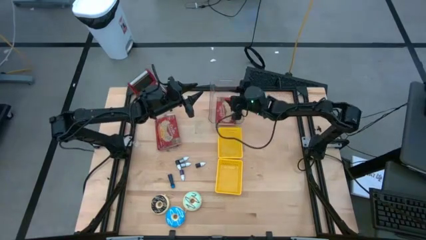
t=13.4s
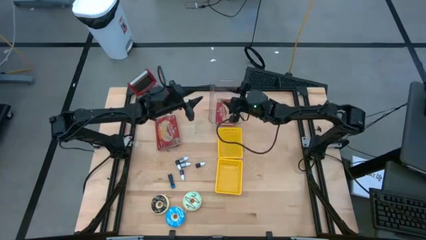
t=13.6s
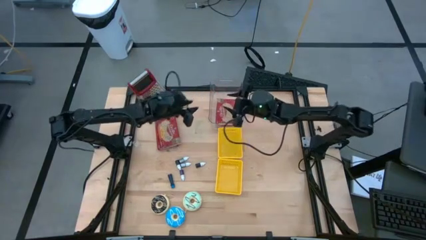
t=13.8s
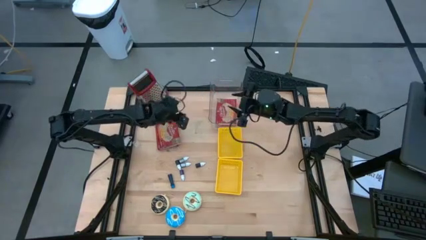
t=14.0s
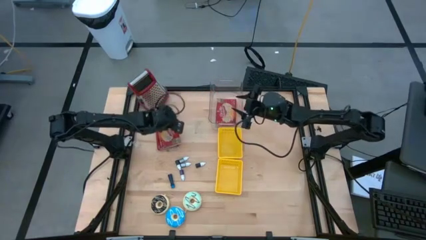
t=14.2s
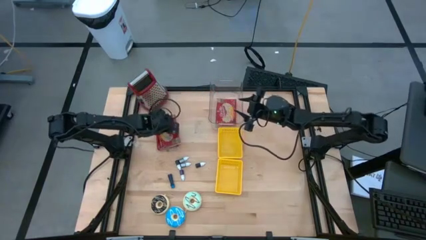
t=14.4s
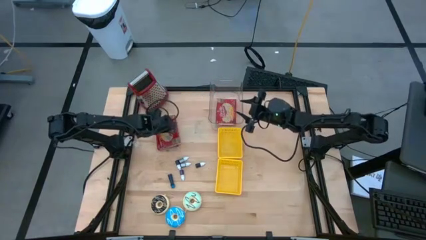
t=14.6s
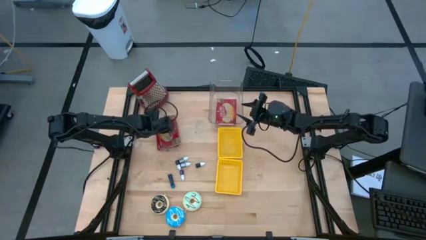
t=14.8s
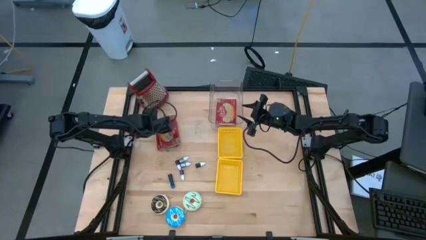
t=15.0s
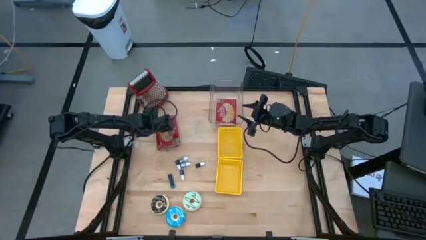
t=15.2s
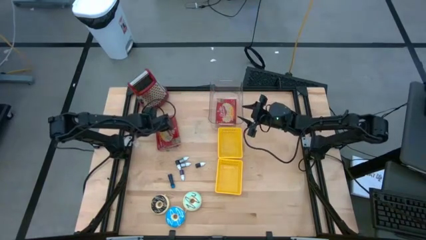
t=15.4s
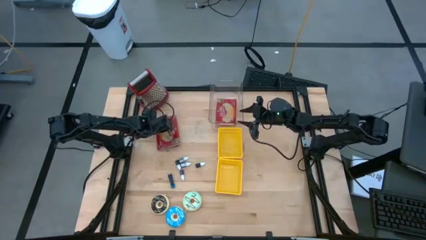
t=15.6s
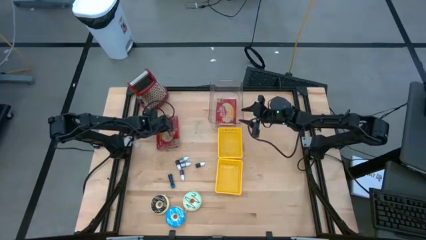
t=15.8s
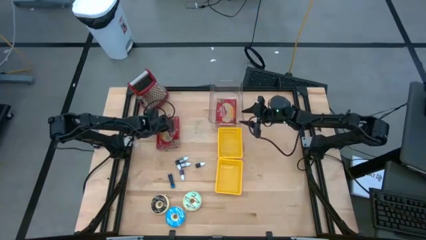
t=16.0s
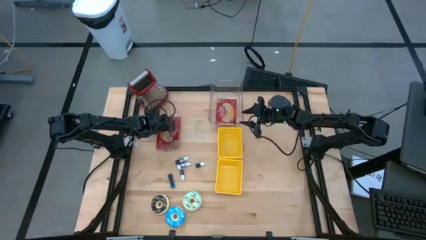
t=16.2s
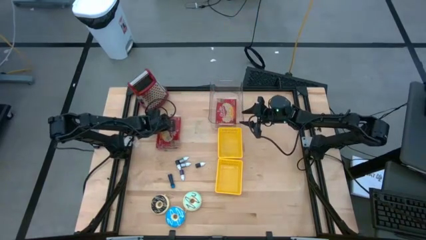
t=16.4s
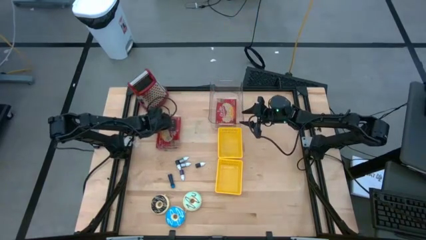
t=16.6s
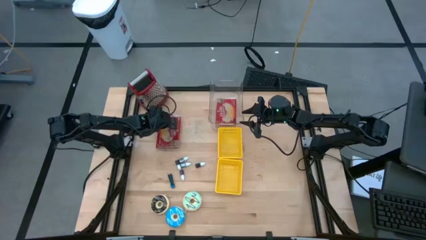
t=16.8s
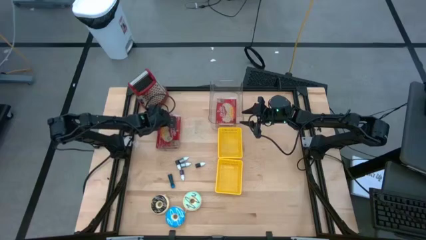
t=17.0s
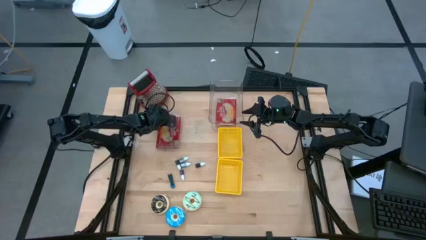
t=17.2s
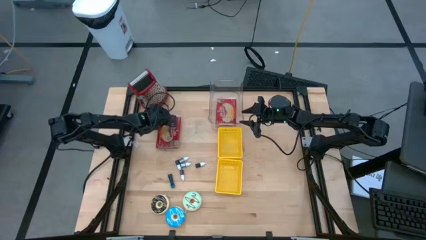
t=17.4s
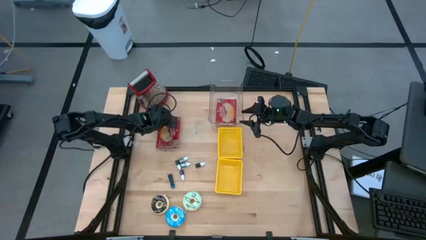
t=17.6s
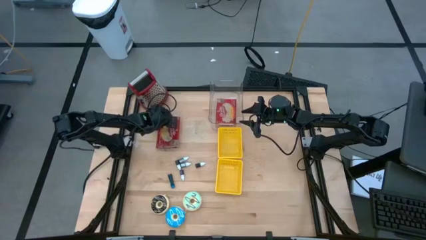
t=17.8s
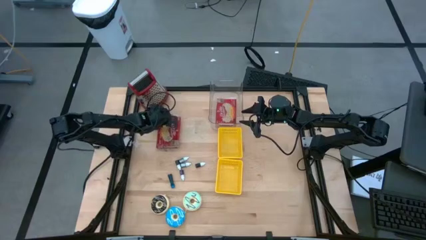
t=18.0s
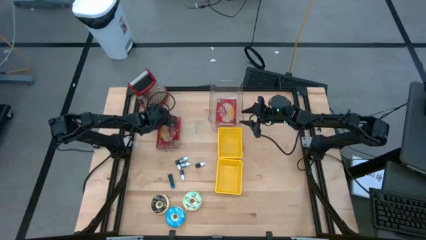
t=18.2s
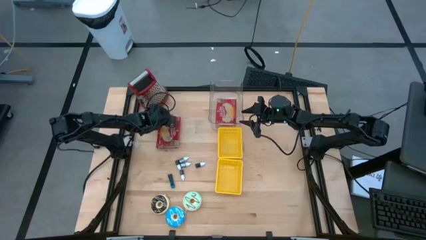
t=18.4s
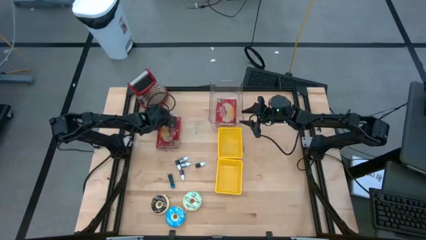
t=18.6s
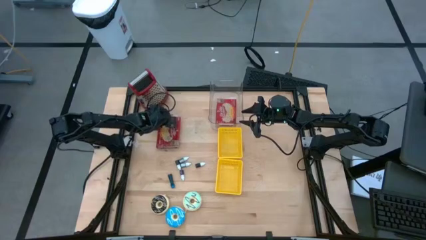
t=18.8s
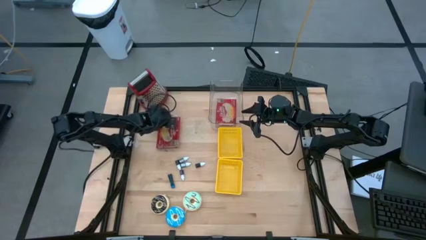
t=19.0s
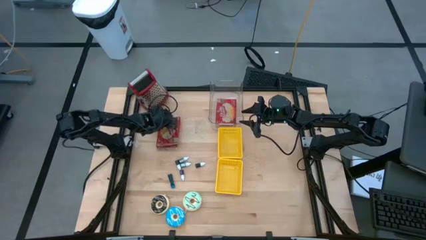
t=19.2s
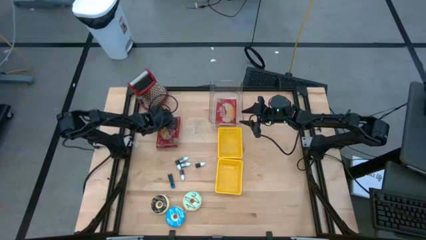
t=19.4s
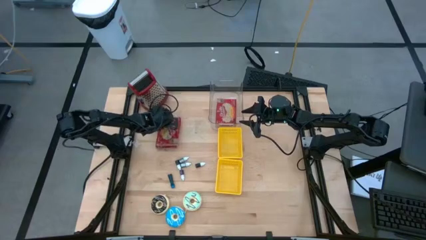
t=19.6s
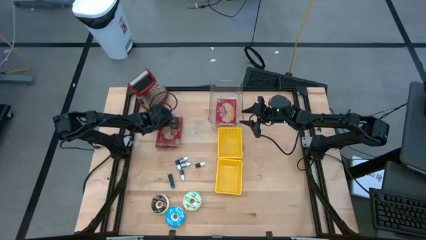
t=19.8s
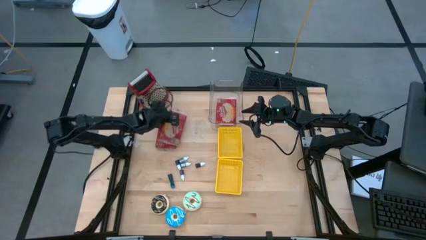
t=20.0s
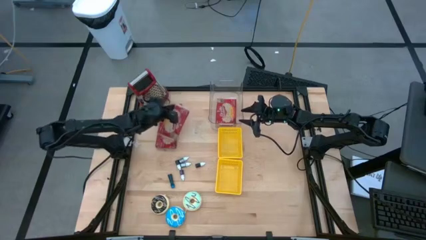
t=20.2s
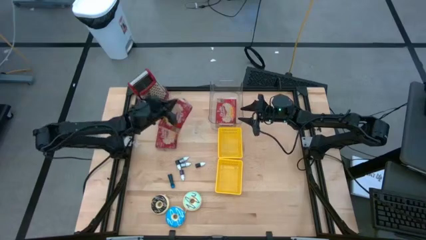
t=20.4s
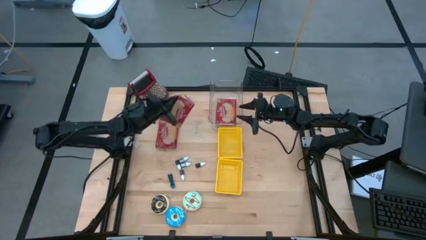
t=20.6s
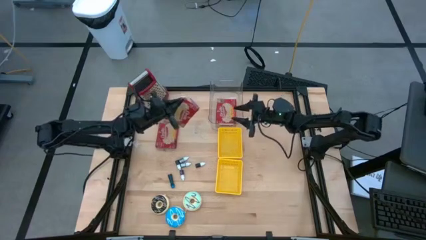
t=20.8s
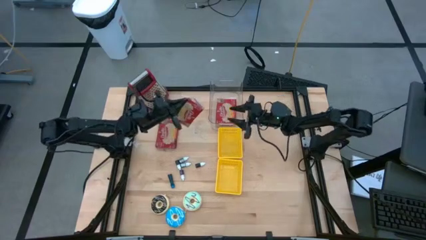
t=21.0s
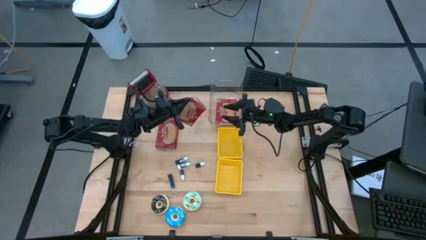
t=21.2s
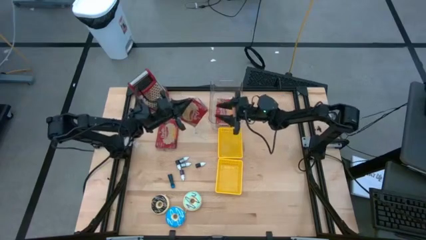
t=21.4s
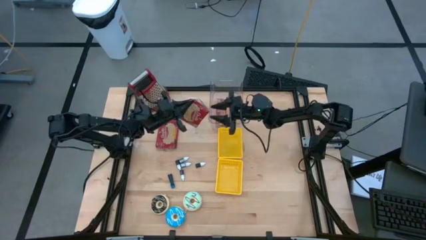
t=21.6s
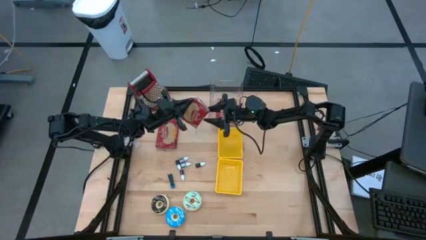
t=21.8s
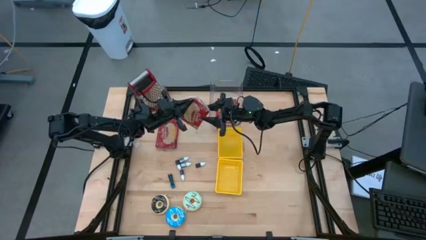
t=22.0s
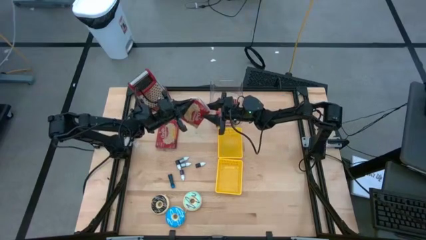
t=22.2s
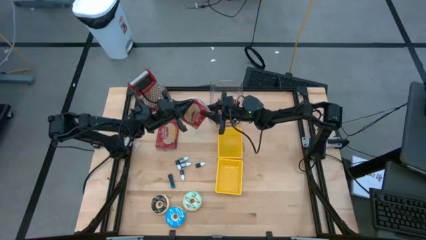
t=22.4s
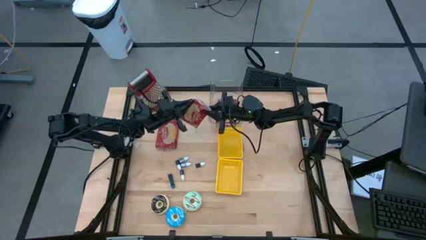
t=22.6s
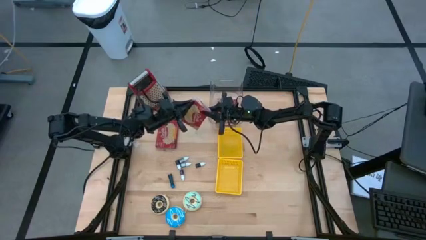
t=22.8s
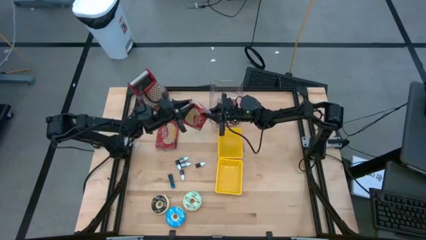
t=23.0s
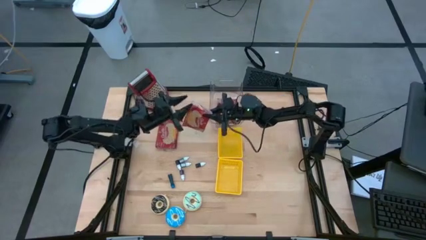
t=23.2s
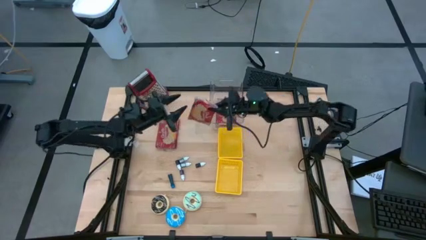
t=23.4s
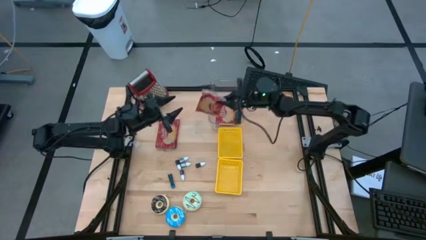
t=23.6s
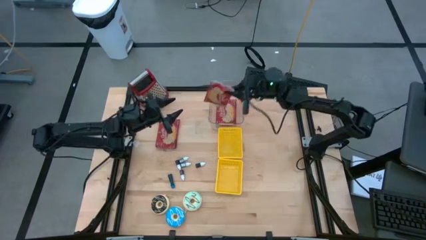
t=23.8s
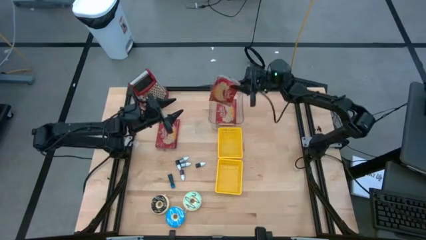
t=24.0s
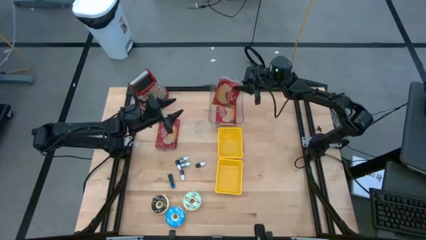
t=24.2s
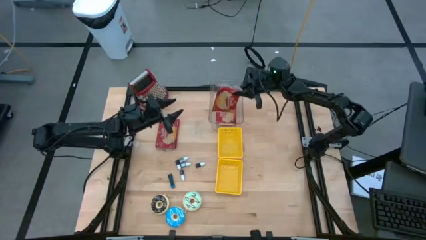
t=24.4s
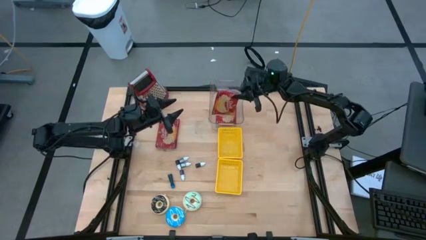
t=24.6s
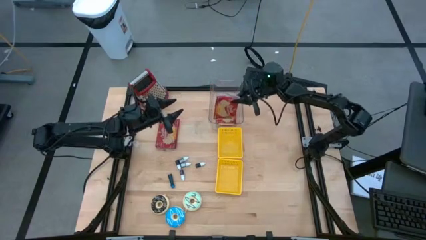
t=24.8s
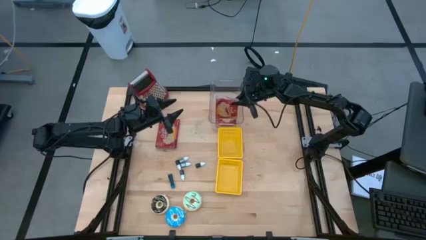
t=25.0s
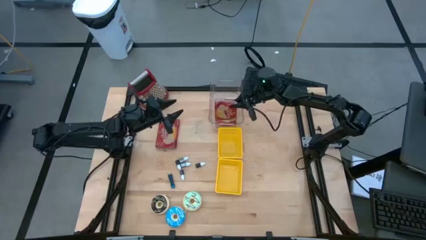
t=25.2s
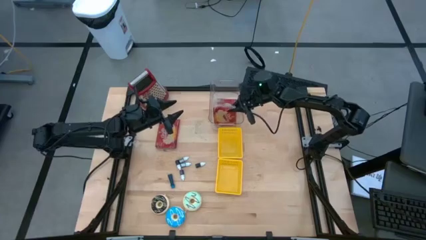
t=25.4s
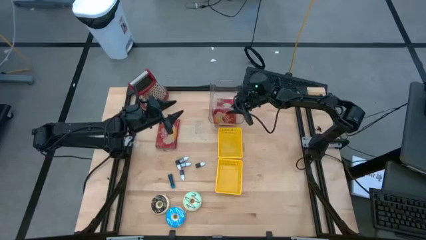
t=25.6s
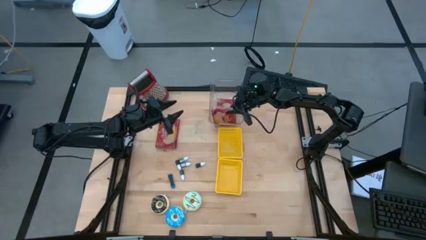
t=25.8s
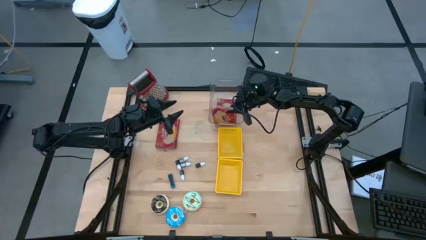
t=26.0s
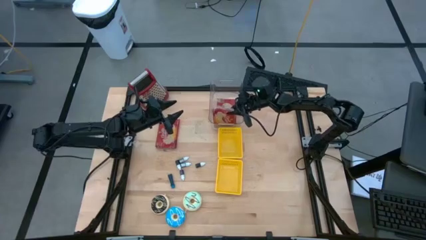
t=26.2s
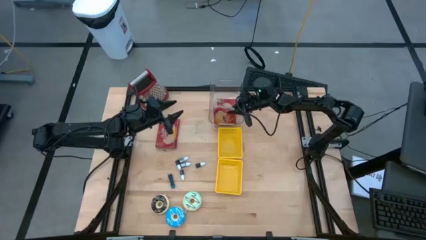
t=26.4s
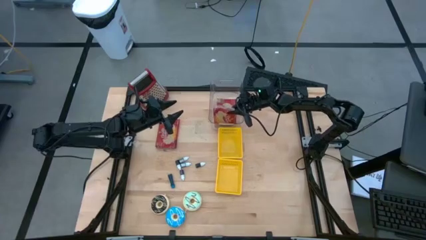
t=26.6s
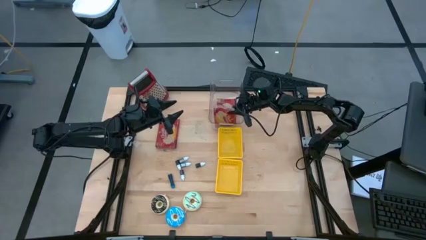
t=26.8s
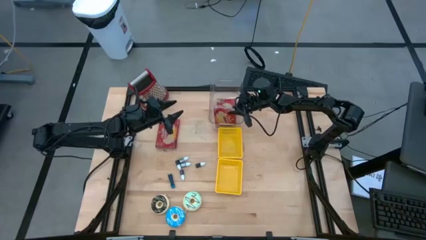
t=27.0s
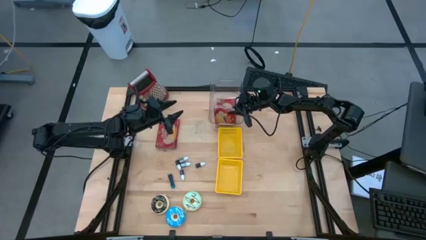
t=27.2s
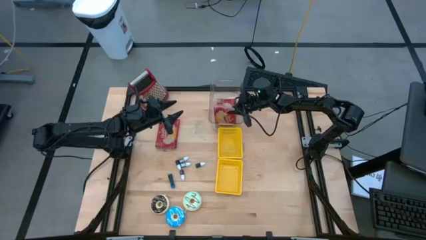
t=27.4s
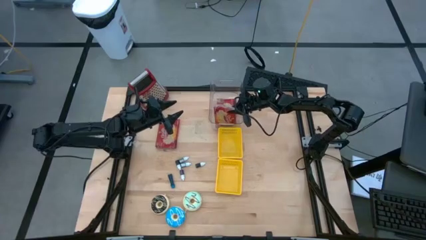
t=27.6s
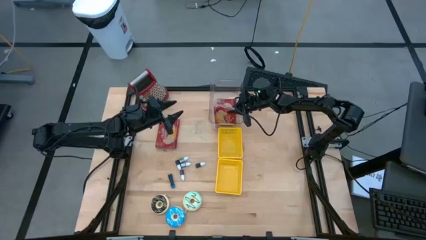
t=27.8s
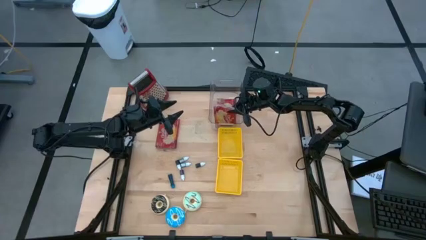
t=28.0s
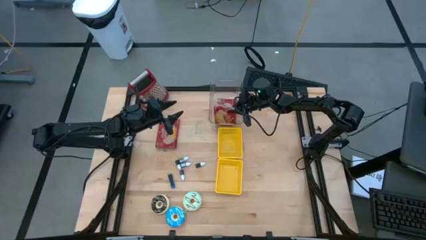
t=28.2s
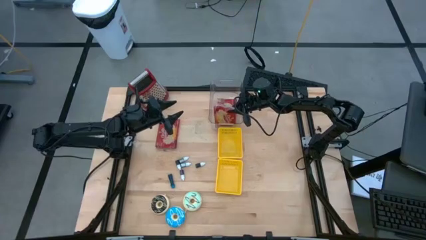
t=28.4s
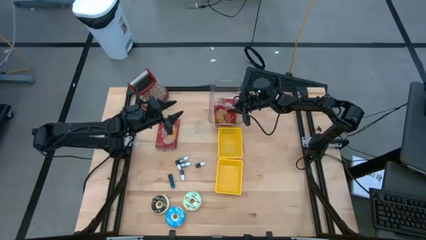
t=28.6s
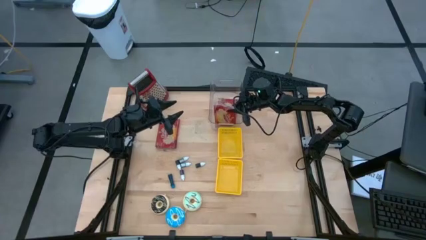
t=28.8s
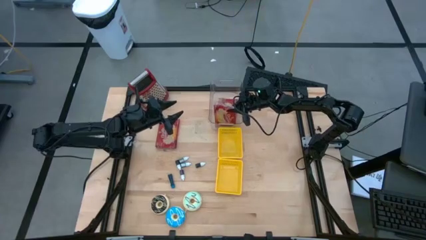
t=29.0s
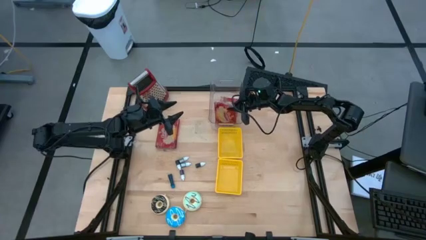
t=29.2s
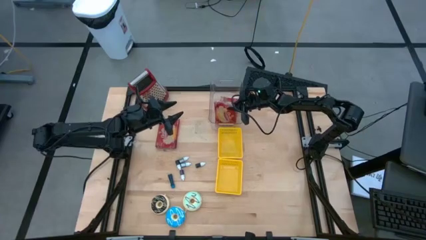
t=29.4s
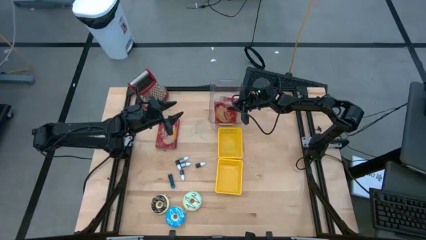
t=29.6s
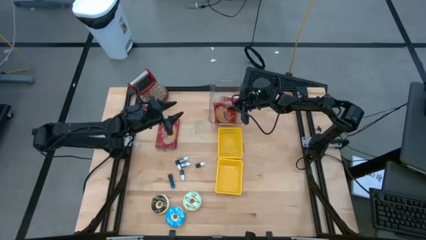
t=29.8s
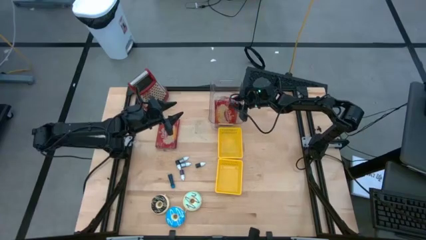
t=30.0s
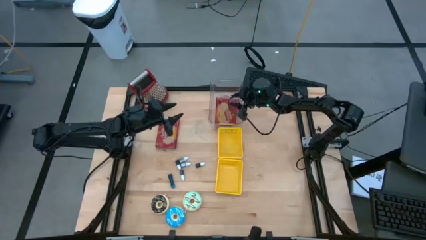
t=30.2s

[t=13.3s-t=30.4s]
Put the red popcorn bag into the transparent bin
